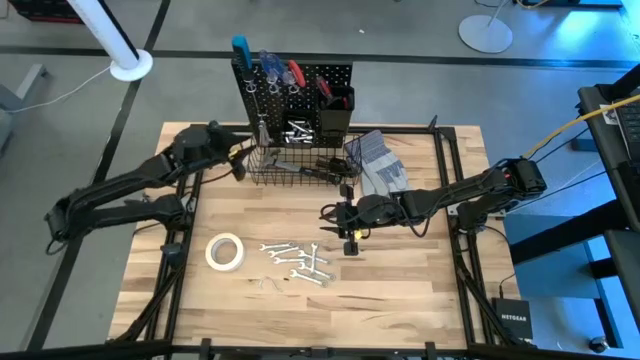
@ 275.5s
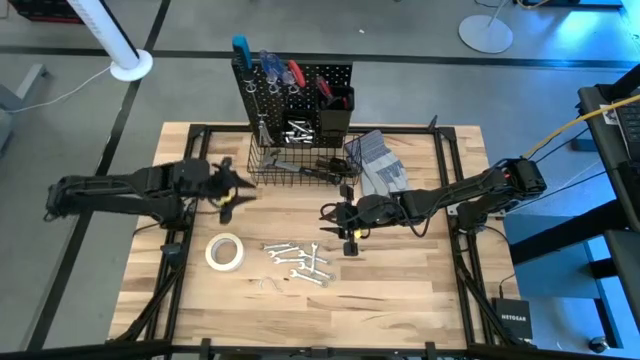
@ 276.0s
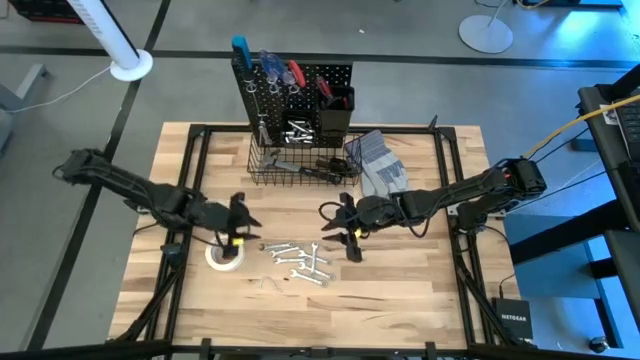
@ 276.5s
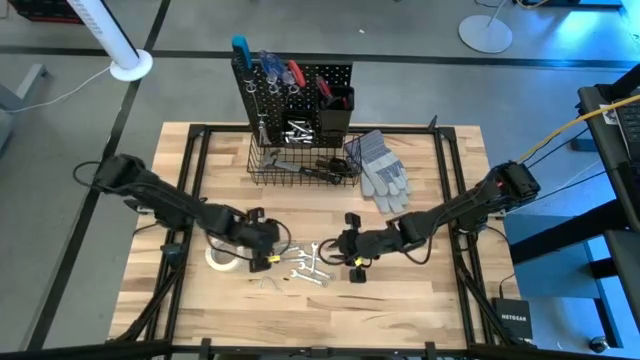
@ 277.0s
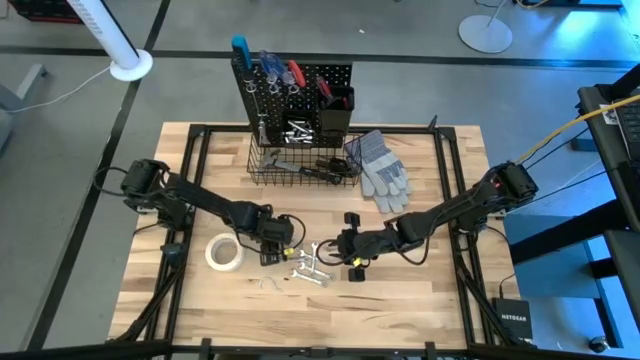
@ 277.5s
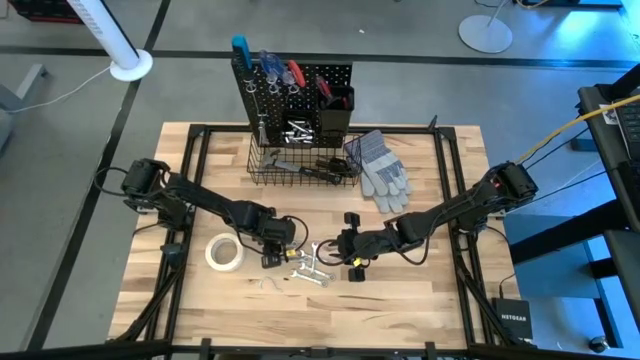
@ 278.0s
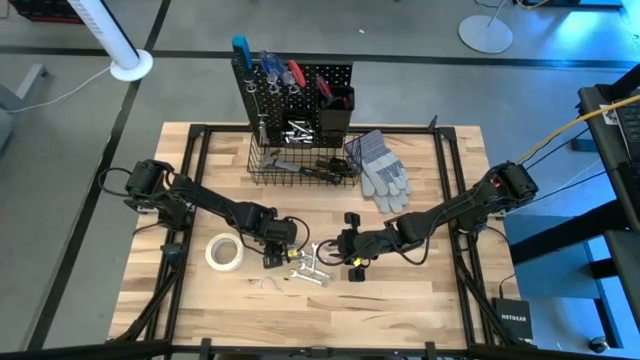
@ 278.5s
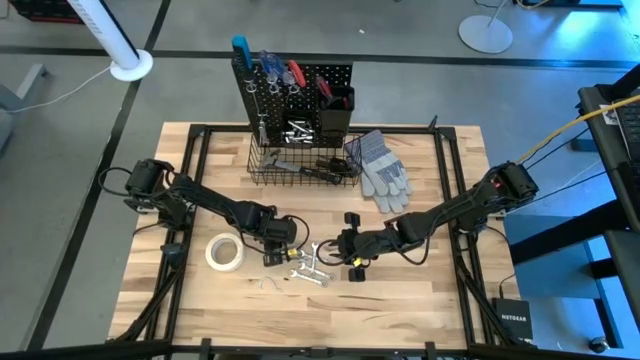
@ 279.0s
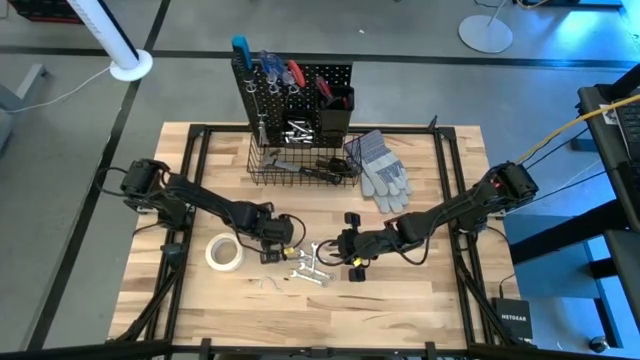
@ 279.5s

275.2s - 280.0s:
Task: Hang tools onto peg board
Hang the wrench on the peg board

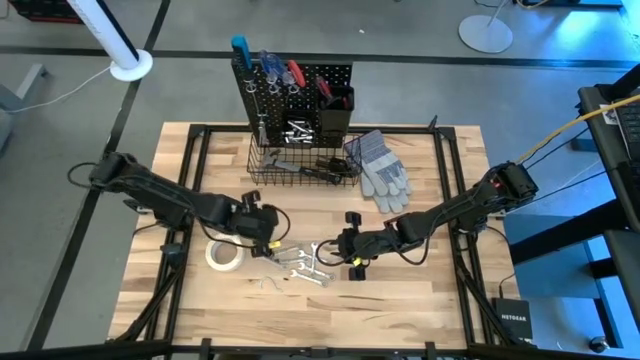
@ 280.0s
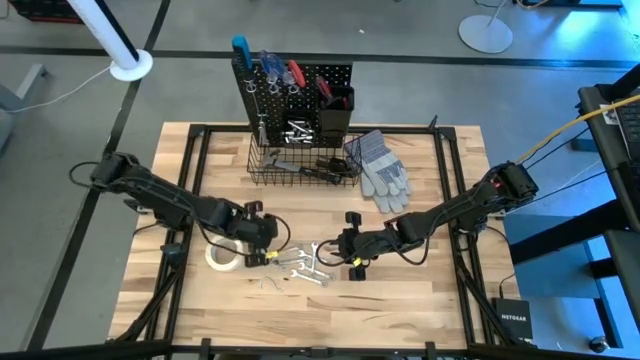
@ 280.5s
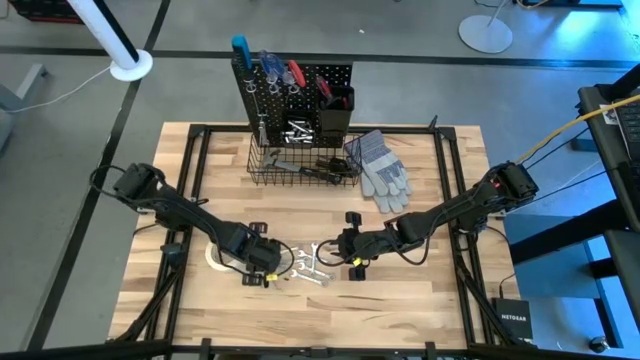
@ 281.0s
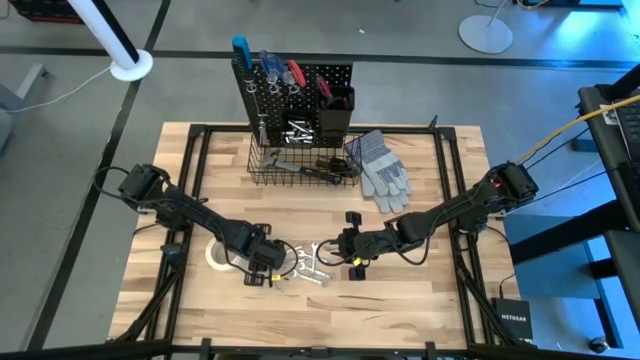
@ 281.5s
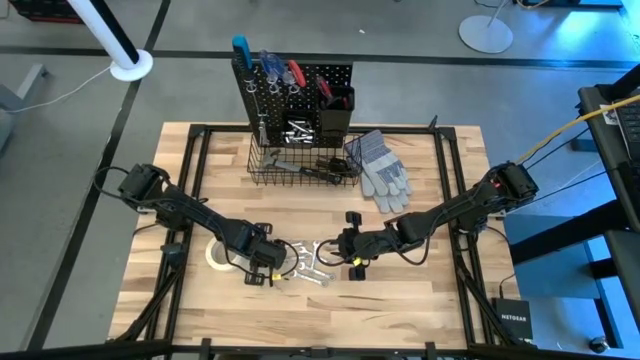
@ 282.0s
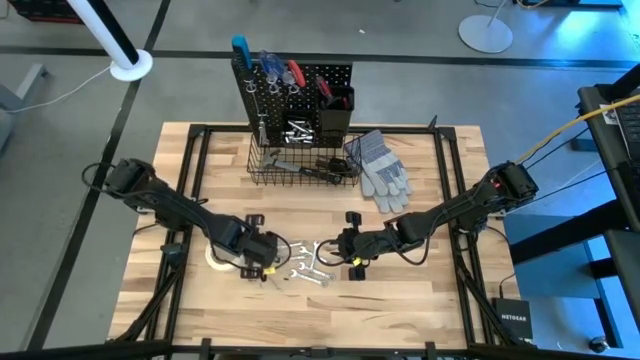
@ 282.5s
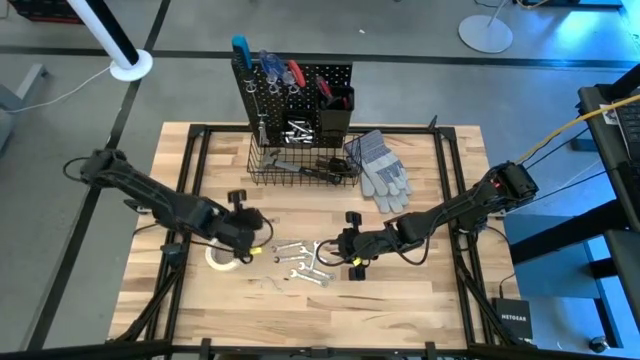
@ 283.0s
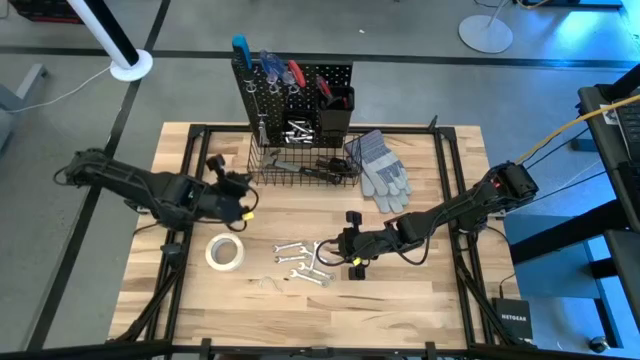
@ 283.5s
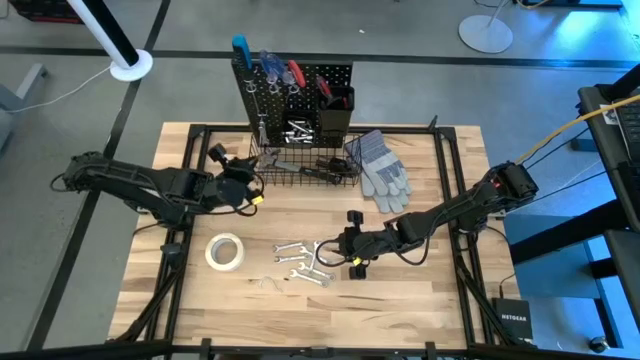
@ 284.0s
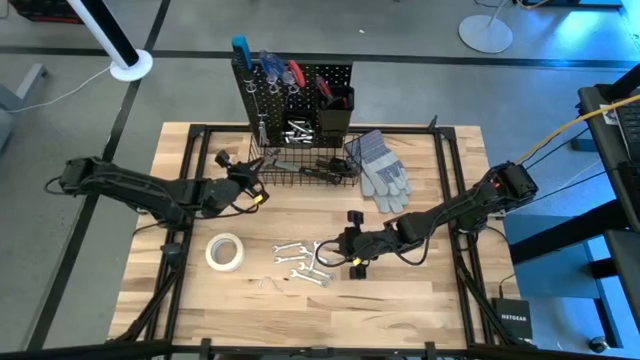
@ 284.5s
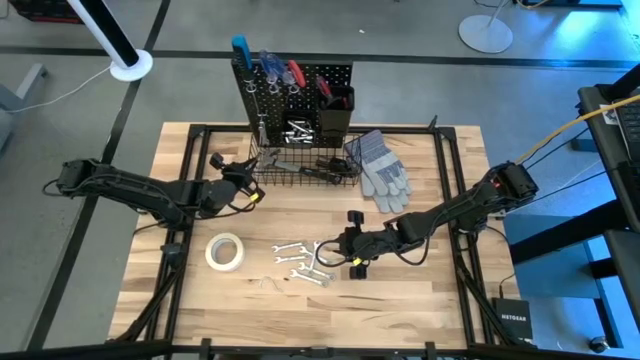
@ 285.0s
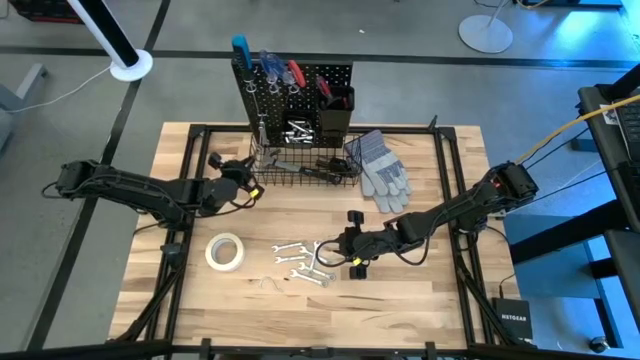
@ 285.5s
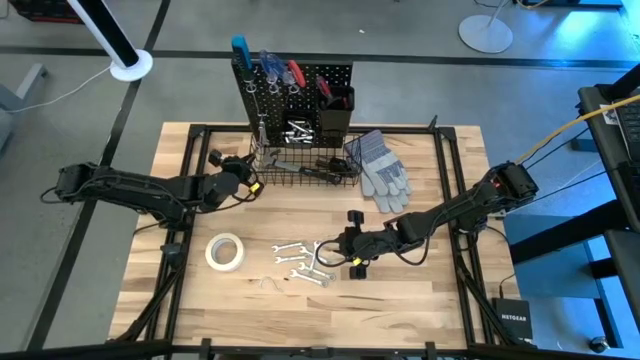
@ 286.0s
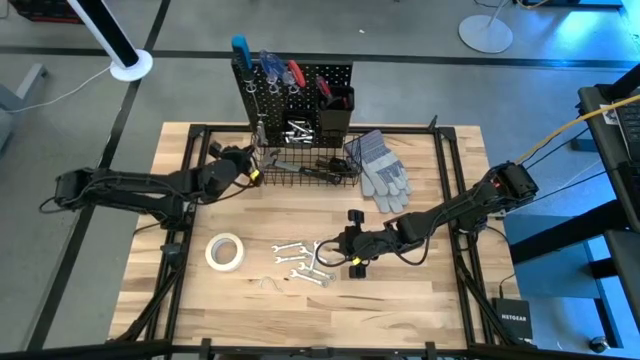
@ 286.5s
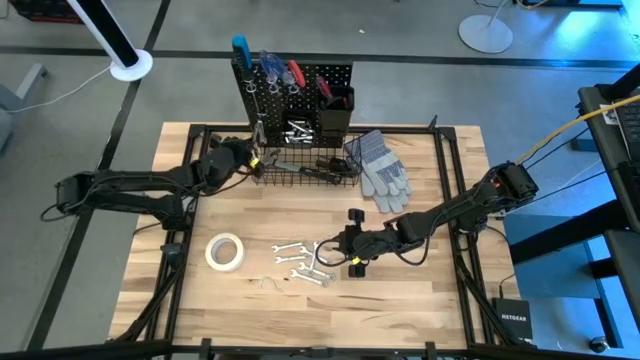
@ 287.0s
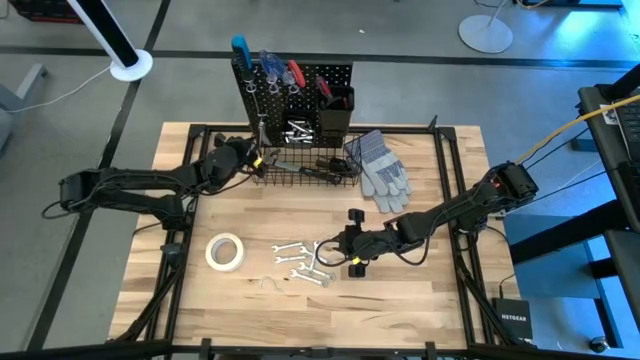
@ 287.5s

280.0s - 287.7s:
Hang the wrench on the peg board

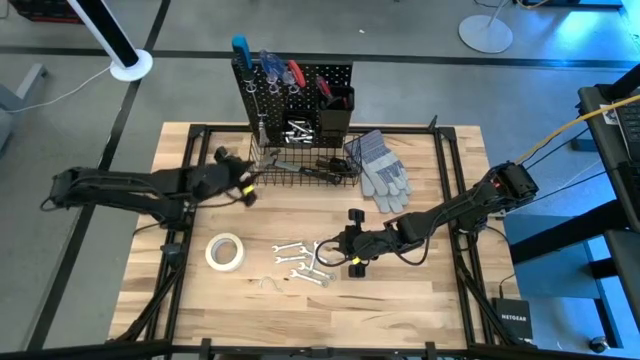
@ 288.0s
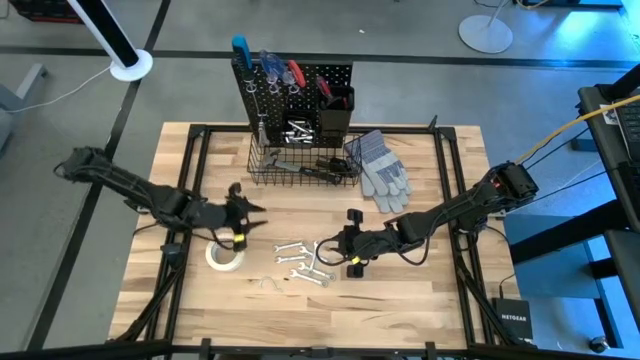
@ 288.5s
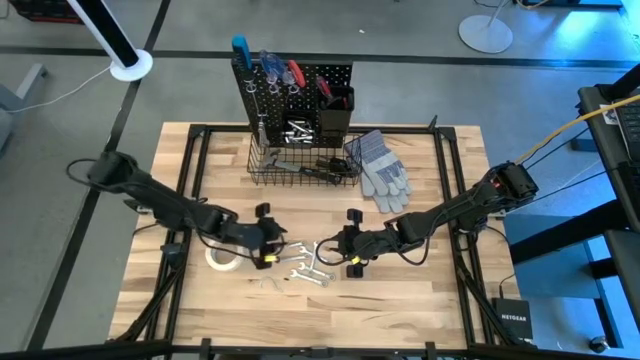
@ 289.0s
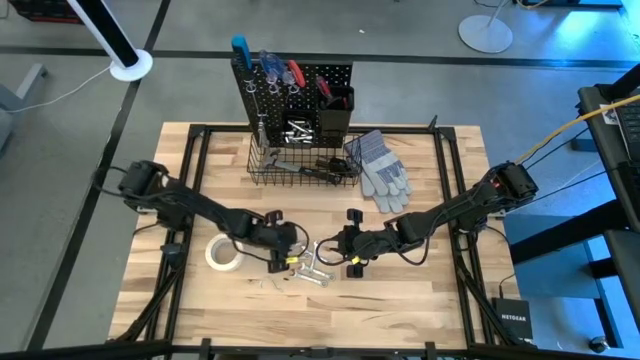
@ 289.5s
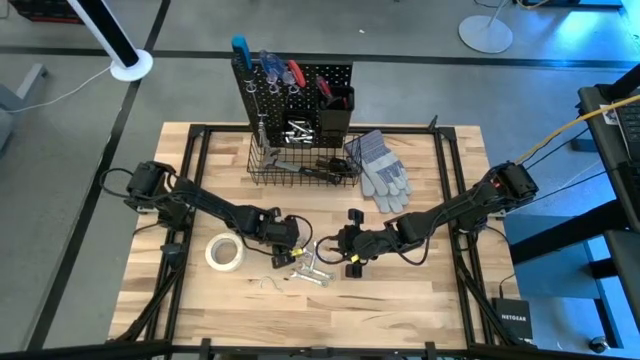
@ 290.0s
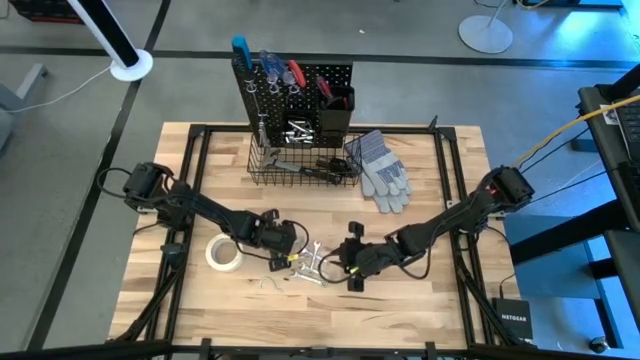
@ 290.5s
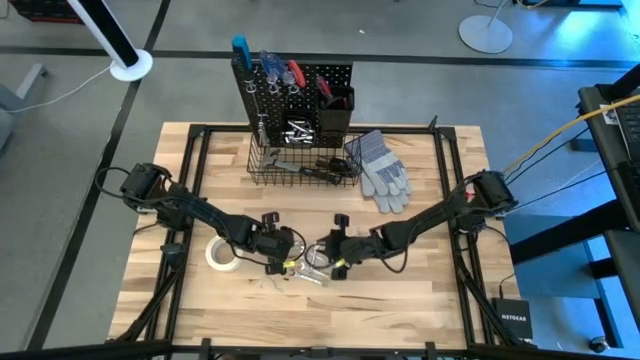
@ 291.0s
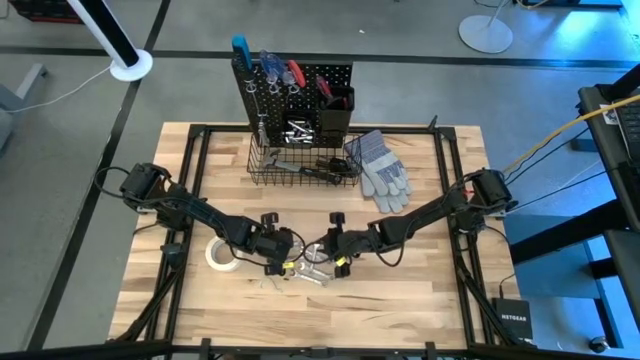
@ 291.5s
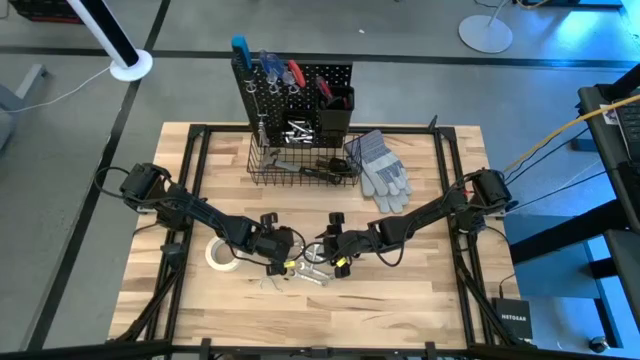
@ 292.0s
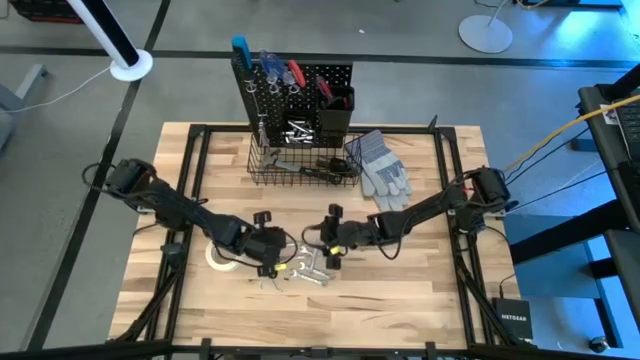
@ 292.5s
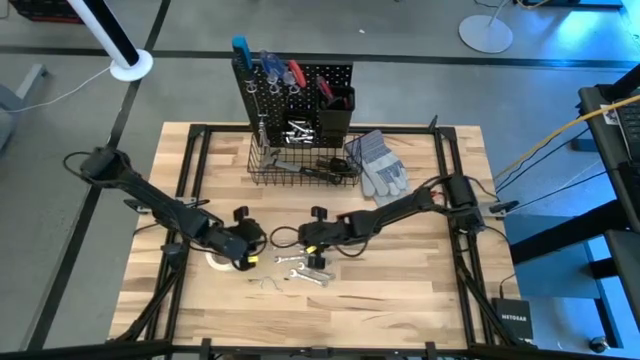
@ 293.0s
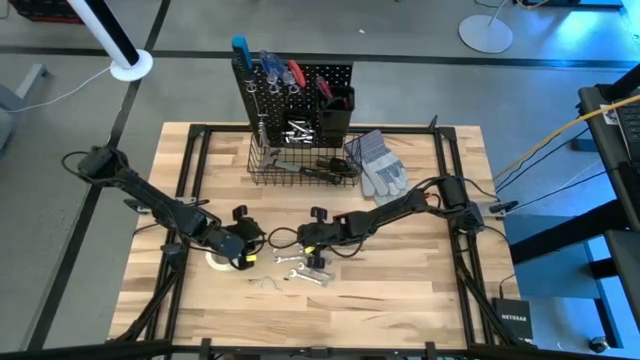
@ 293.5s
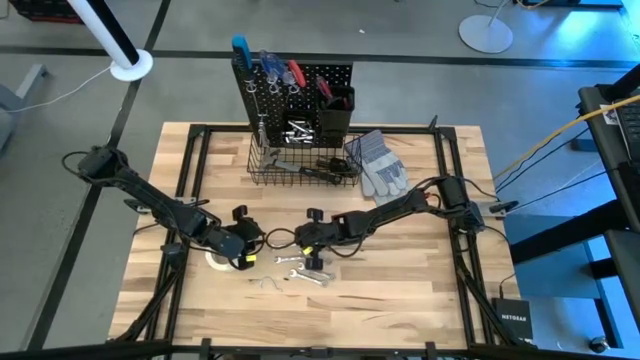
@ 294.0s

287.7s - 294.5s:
Hang the wrench on the peg board

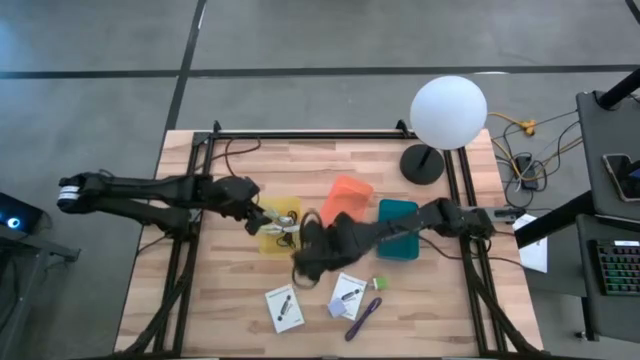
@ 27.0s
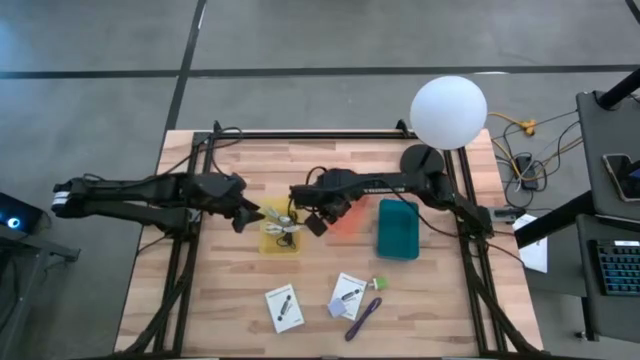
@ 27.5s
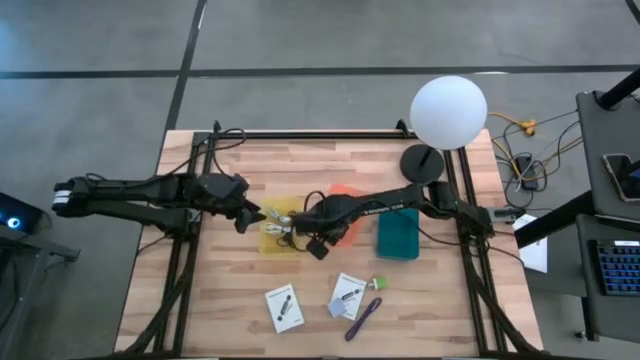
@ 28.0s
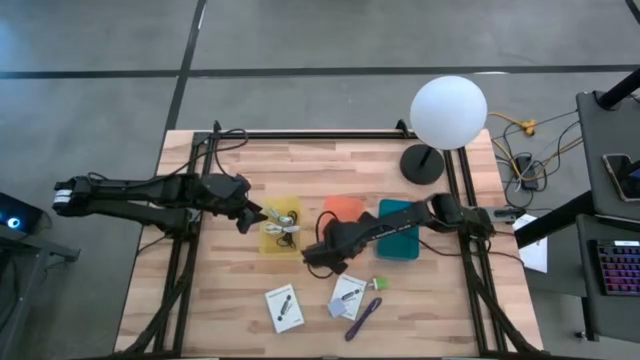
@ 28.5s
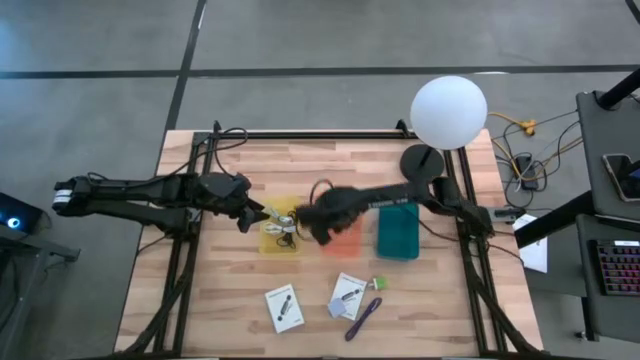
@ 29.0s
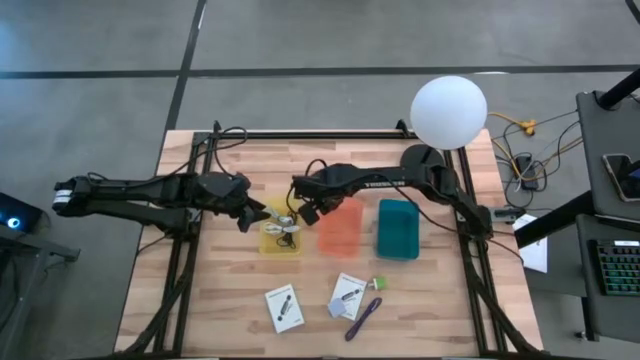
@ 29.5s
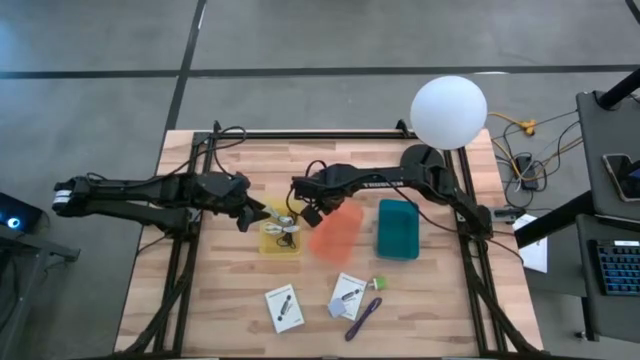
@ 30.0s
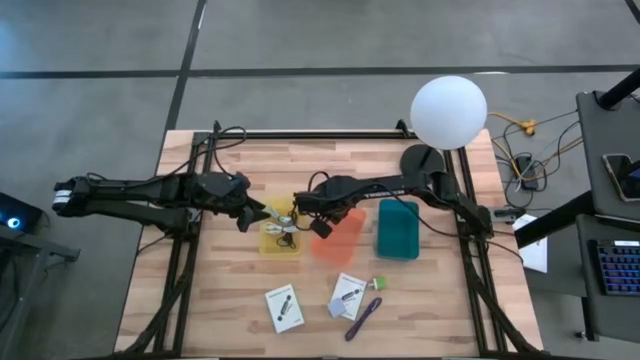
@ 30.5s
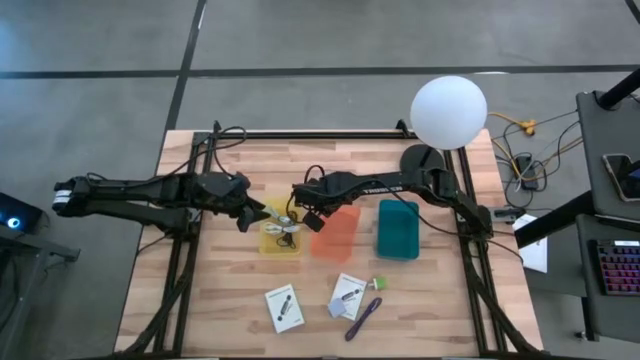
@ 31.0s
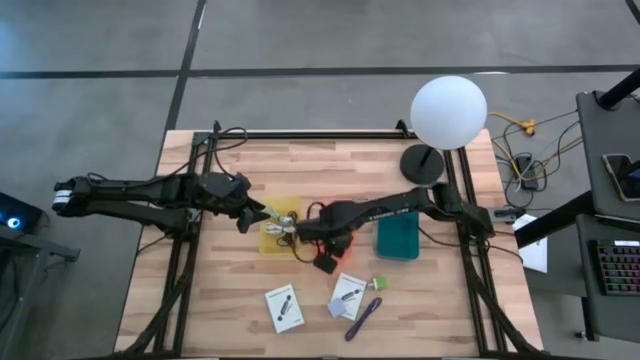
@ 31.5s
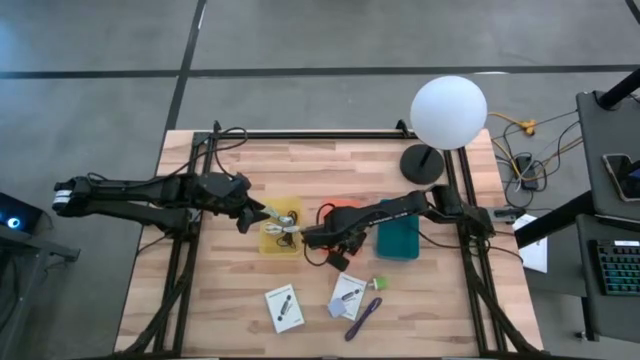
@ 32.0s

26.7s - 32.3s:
Task: Pick and place items into bin
Adjust the orange bin
